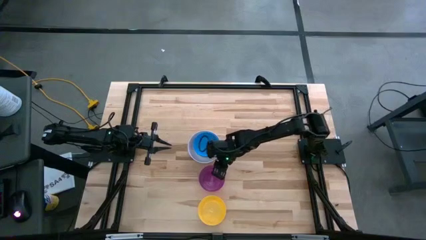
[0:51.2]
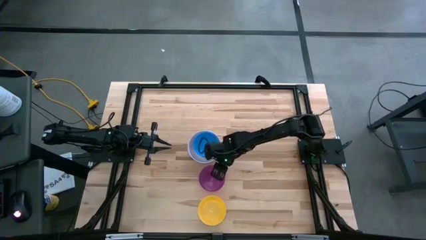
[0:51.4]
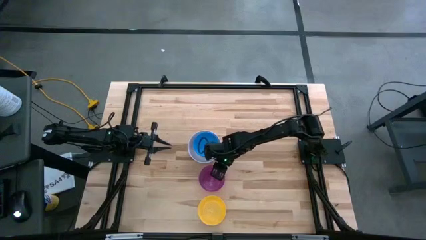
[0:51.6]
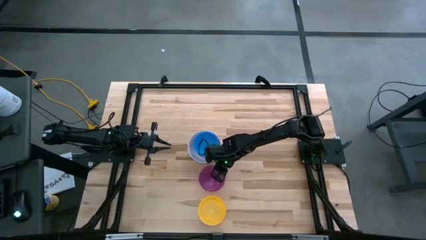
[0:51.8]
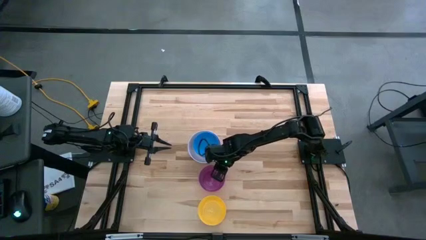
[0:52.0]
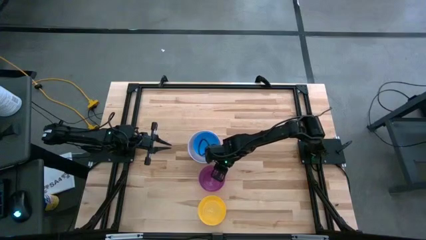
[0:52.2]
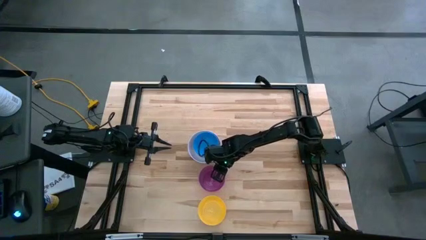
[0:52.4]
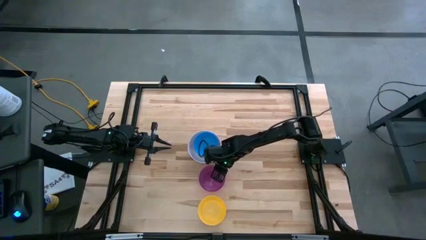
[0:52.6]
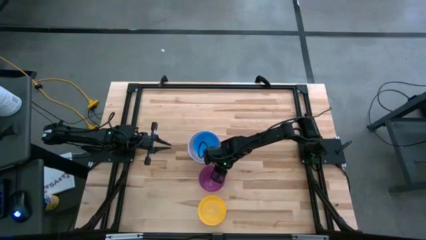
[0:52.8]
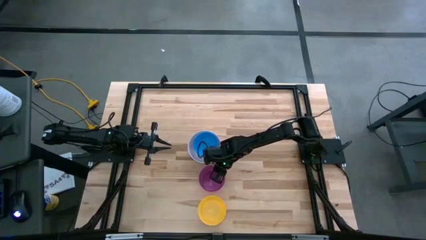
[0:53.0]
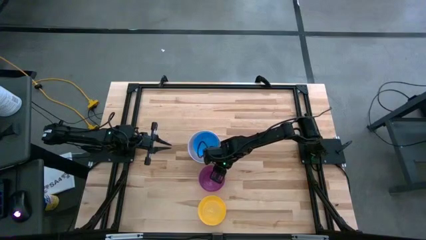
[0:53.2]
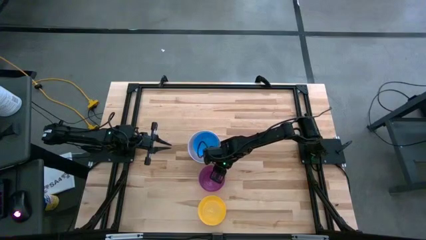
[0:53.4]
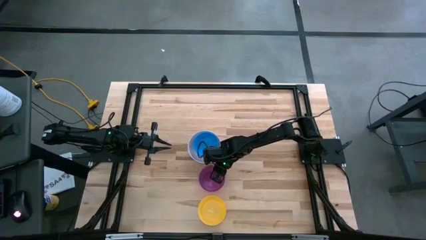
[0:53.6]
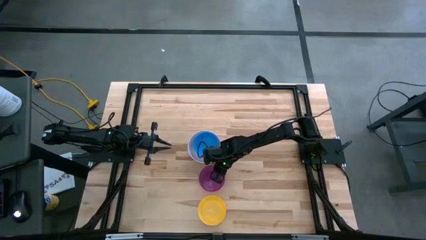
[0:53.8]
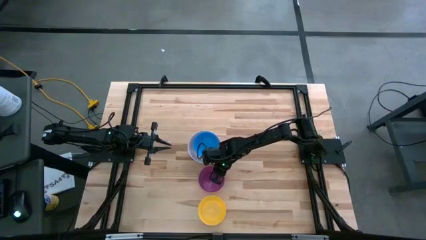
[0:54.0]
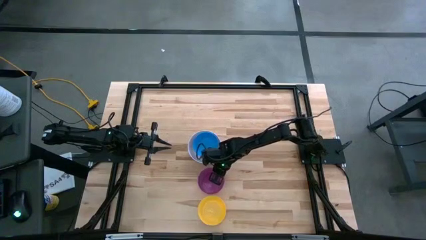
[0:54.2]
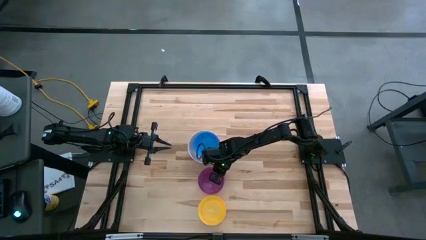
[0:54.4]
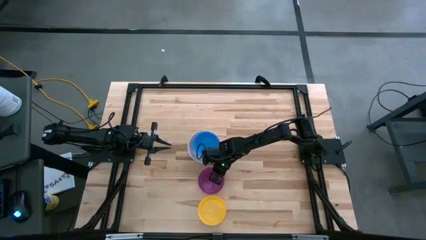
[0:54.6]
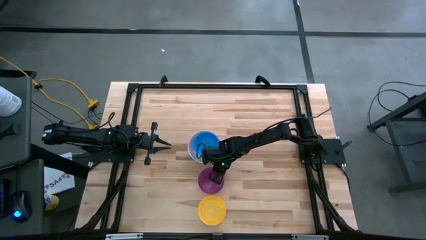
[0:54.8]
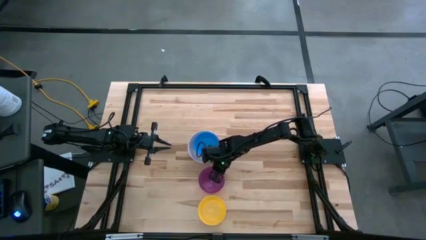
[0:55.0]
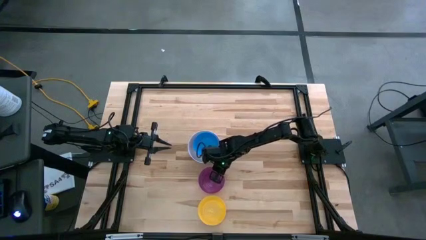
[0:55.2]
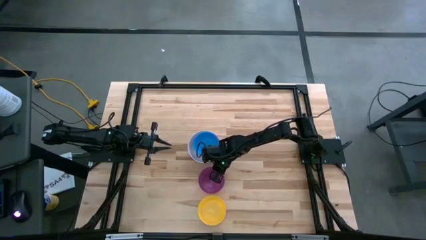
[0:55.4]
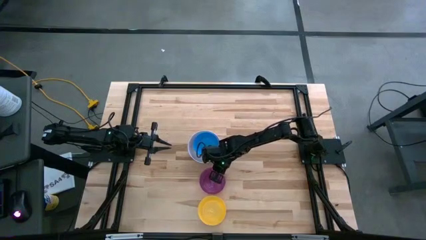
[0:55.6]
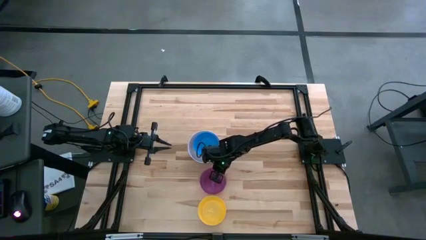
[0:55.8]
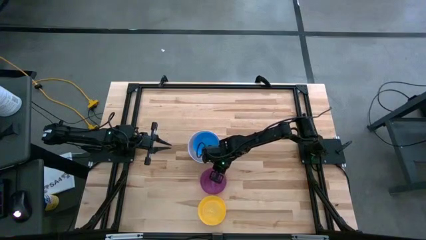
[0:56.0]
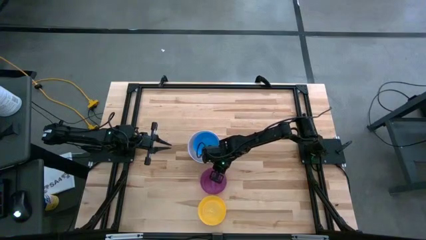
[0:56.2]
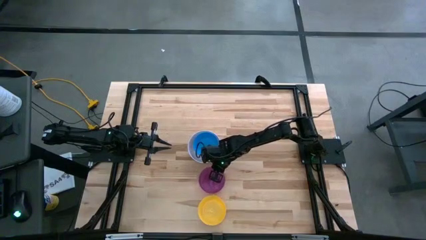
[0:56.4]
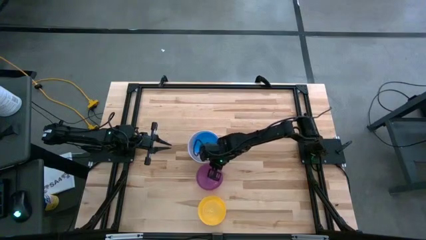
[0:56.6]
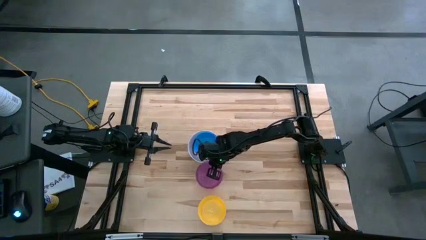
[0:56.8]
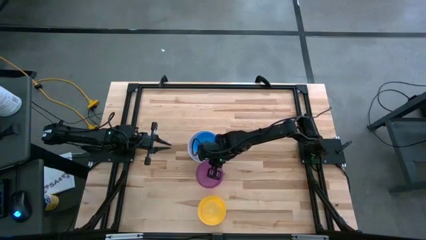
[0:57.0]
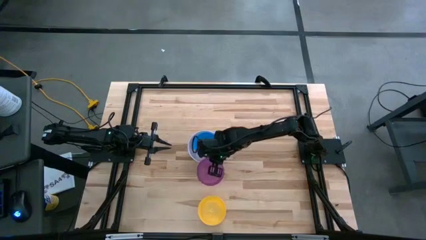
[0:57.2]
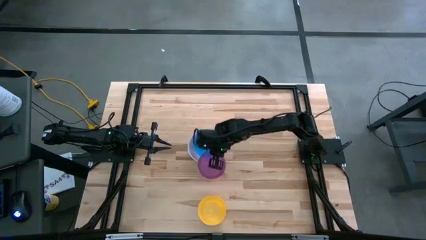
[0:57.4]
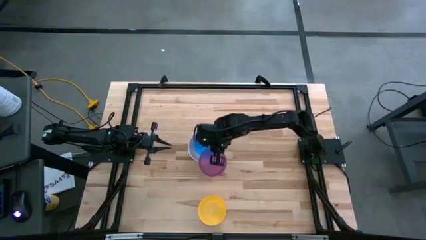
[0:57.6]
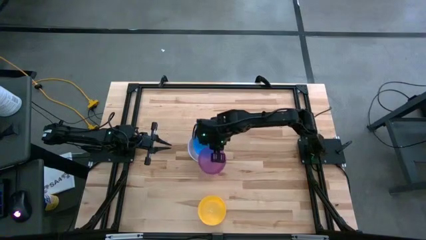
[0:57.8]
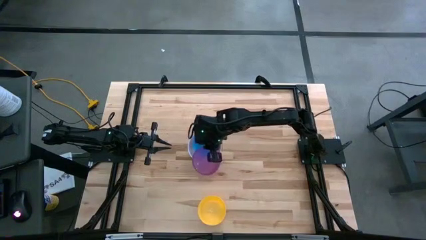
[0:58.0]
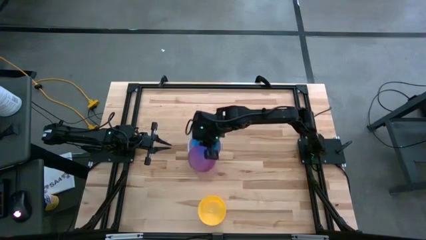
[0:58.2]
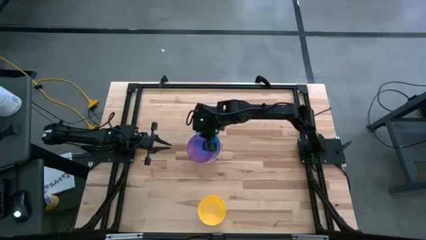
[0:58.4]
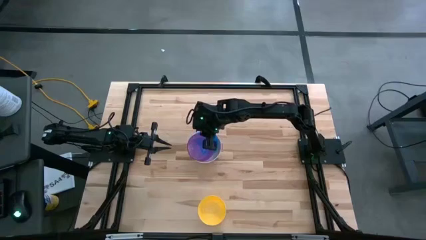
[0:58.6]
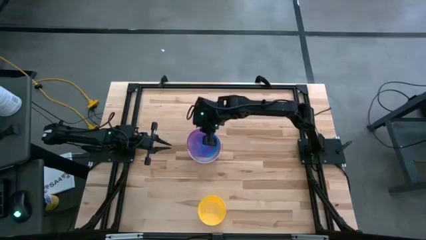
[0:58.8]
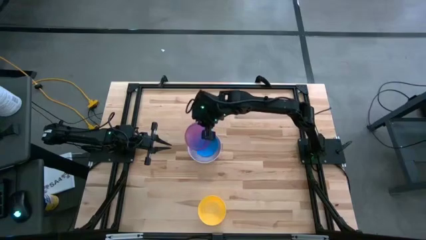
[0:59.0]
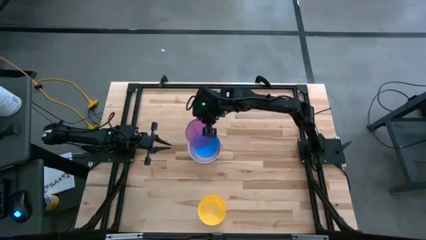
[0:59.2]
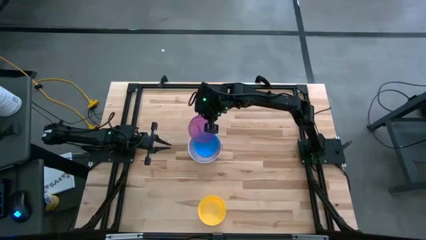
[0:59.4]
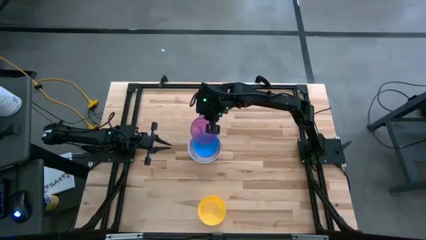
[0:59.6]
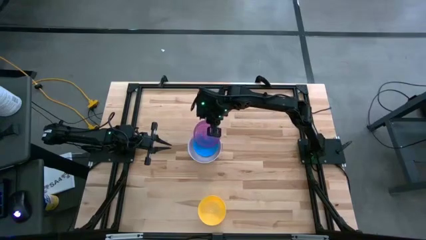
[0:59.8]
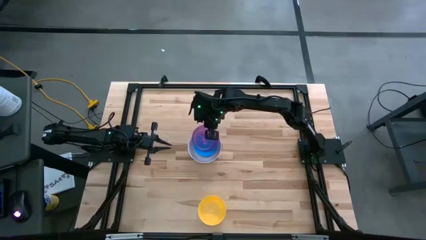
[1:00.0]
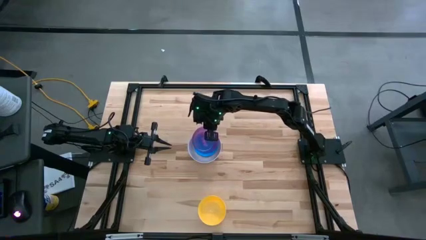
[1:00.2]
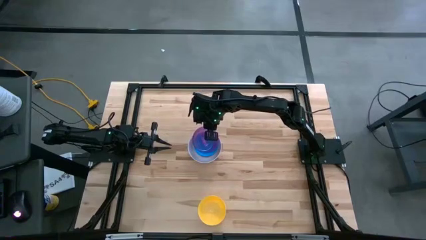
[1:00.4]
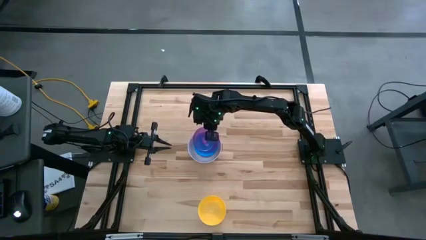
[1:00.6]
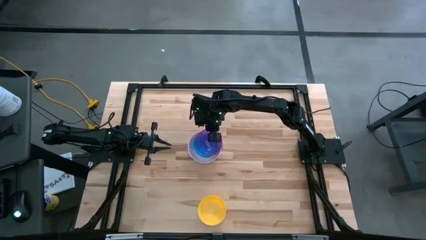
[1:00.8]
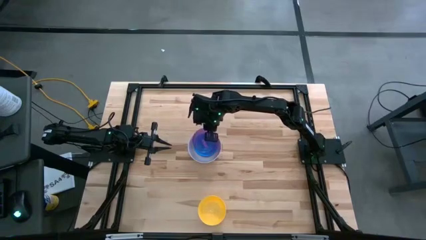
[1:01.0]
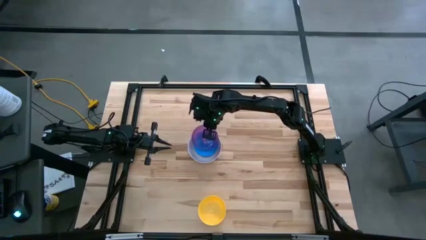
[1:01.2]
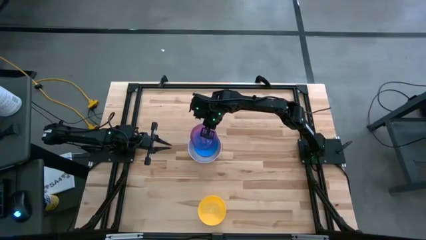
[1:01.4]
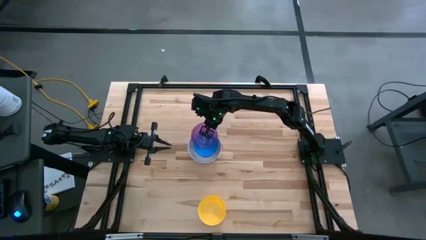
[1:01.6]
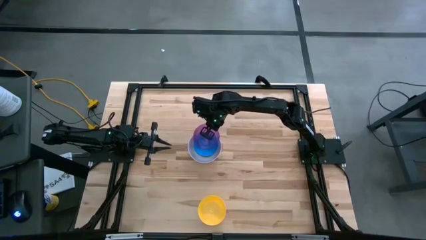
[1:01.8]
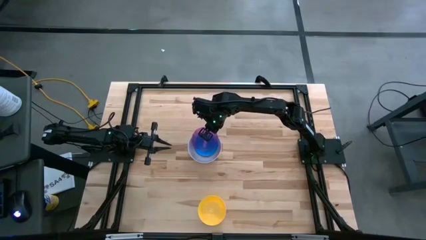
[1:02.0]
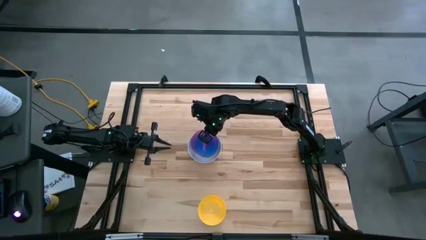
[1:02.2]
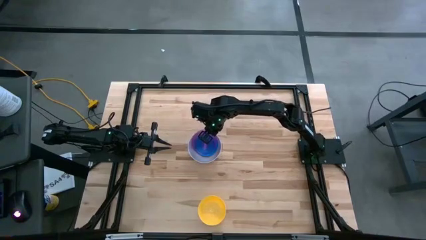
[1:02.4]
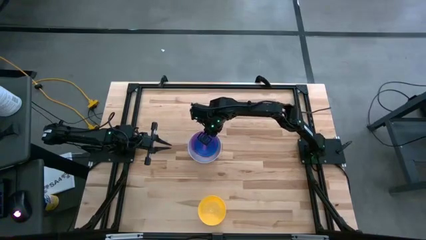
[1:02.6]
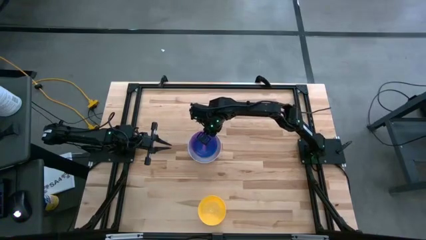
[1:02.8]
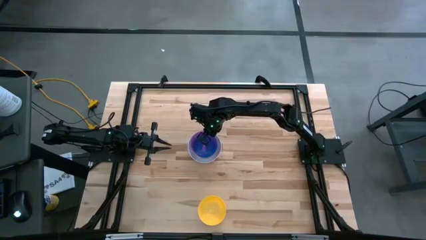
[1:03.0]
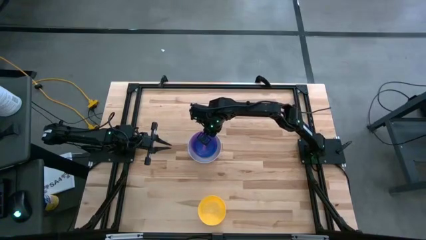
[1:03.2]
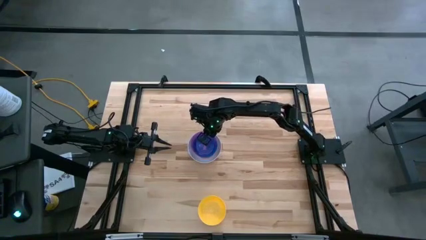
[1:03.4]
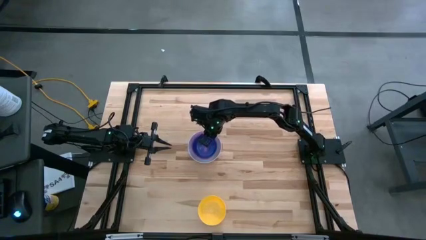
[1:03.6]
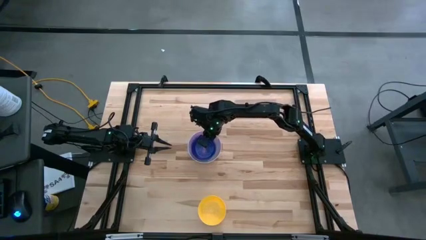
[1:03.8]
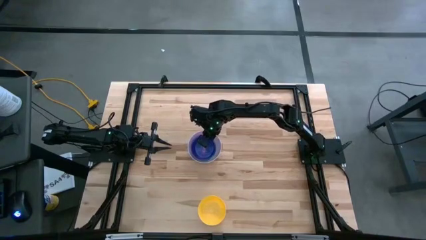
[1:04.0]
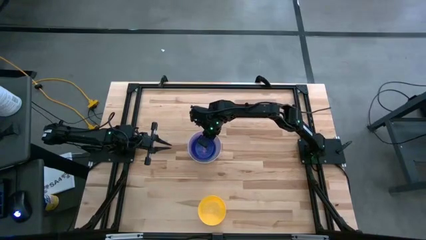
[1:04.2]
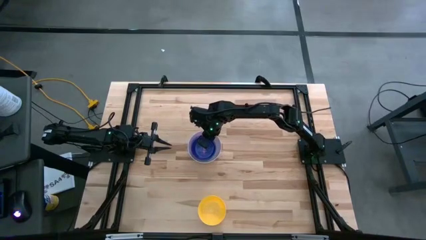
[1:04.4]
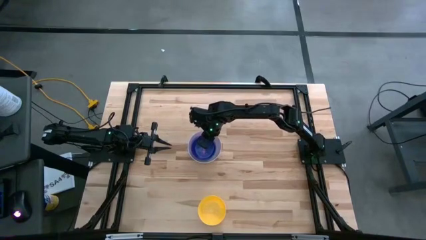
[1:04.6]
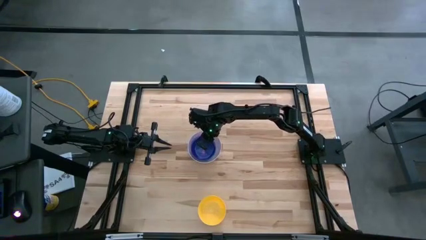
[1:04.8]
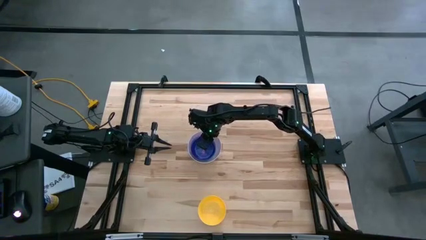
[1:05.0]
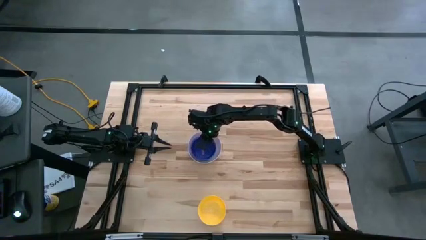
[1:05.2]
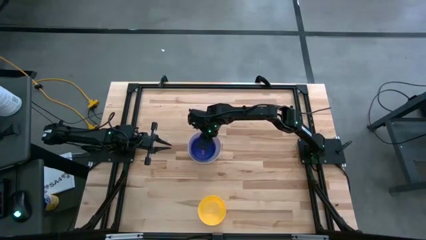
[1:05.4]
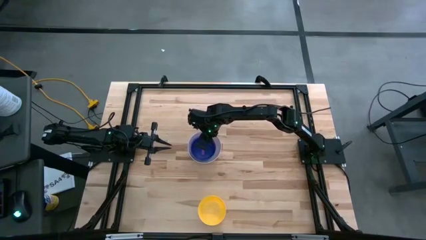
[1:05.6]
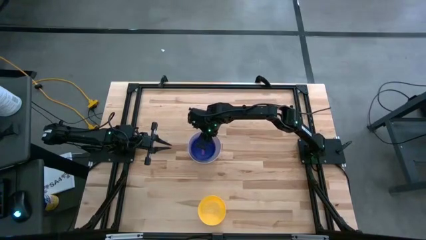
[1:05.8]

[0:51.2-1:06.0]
Stack the purple bowl on the blue bowl
